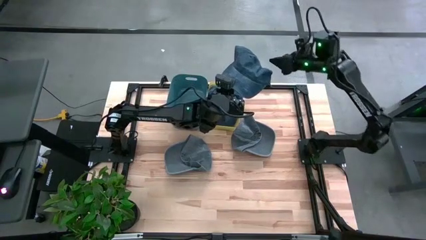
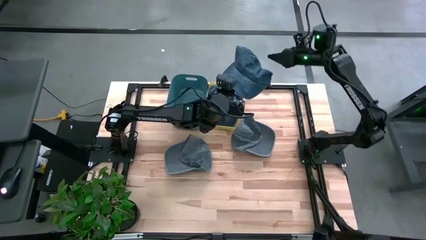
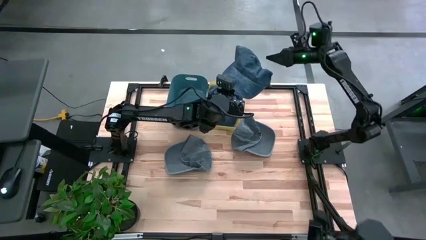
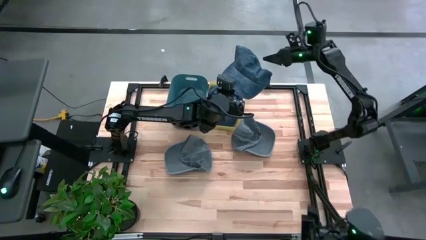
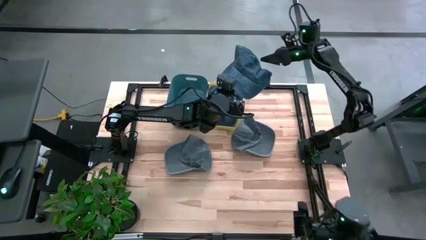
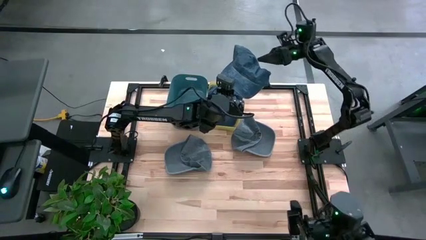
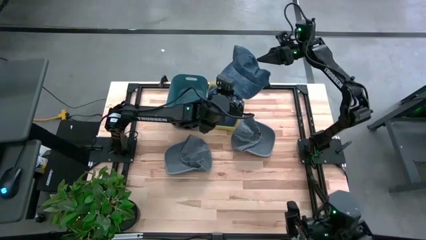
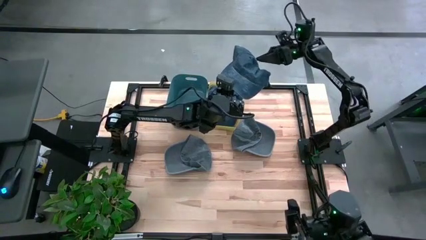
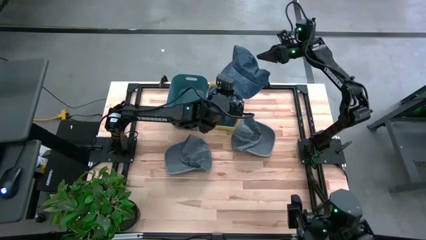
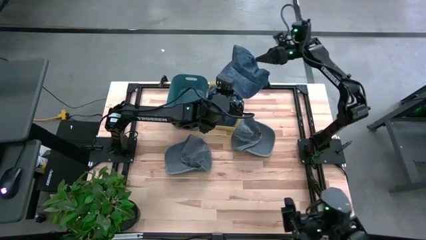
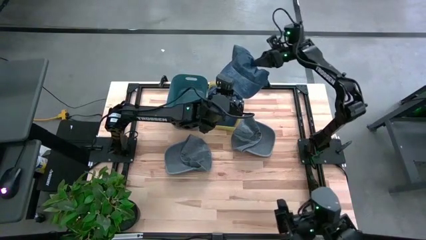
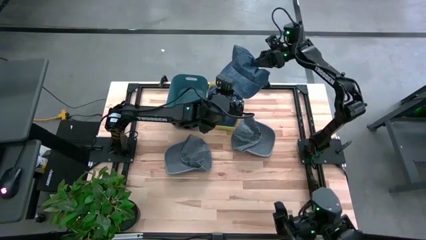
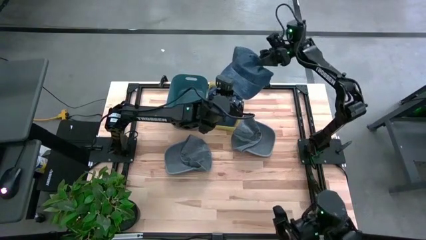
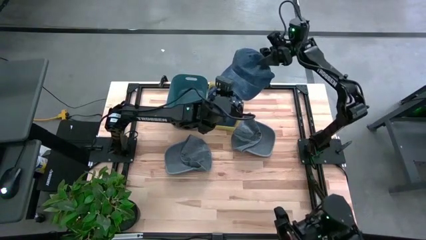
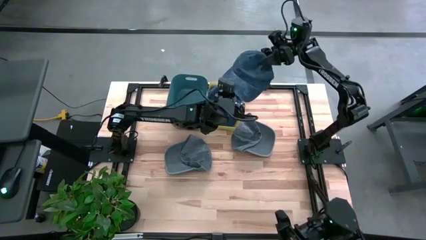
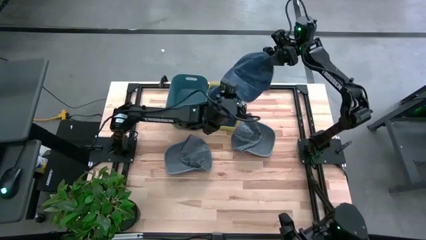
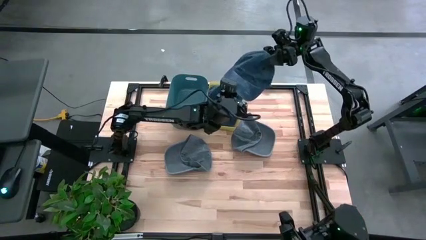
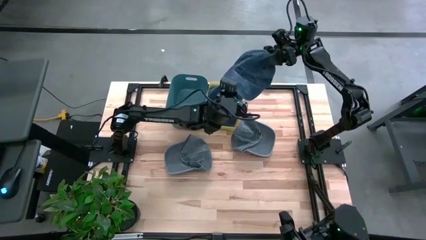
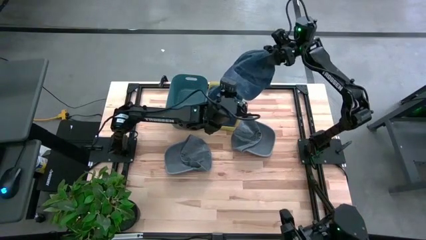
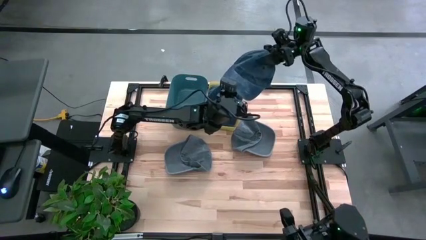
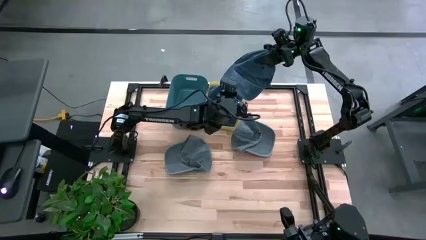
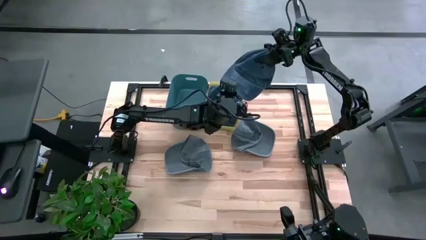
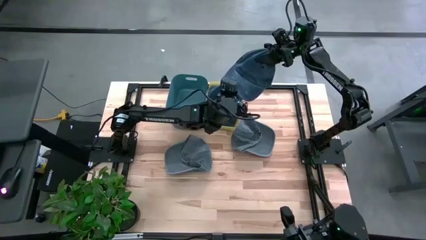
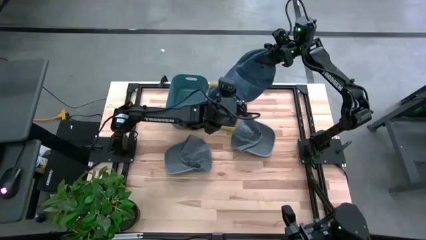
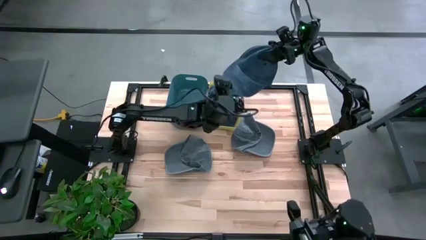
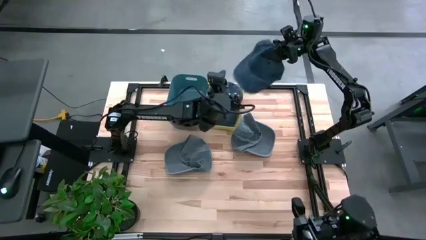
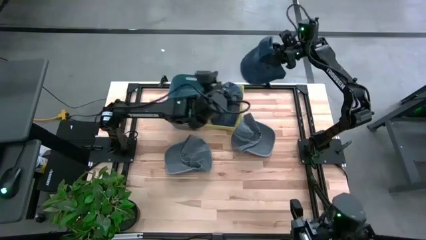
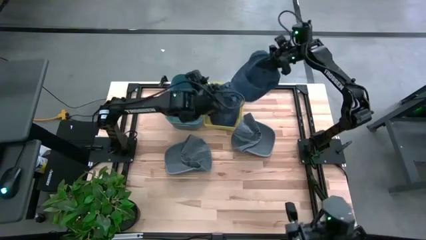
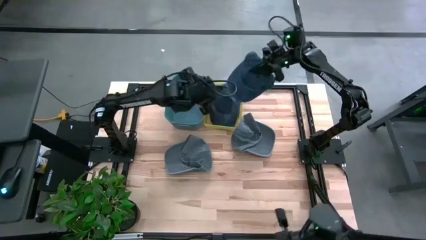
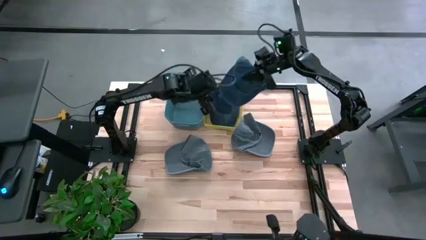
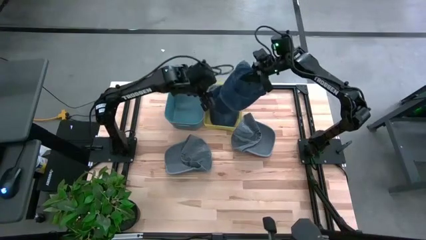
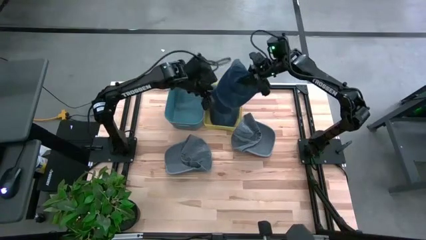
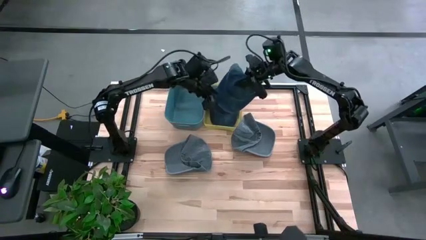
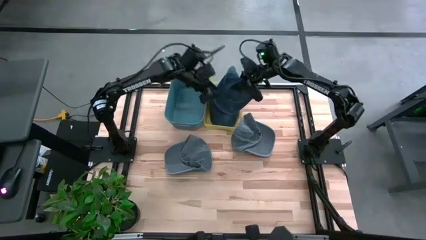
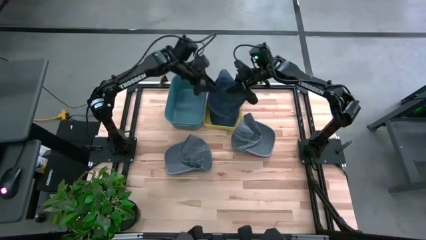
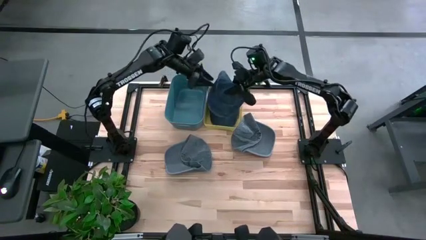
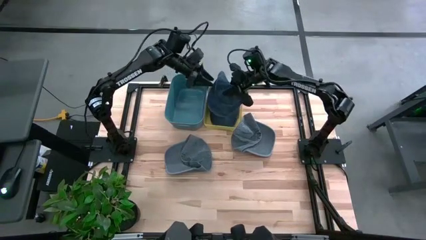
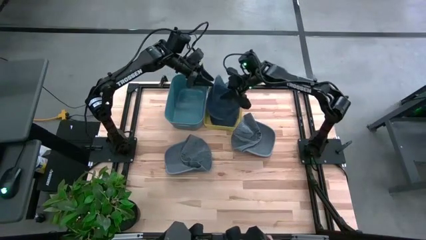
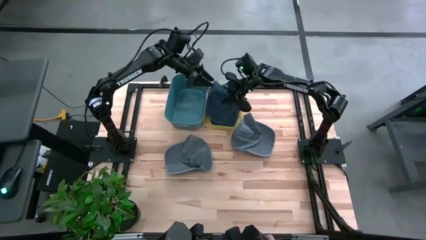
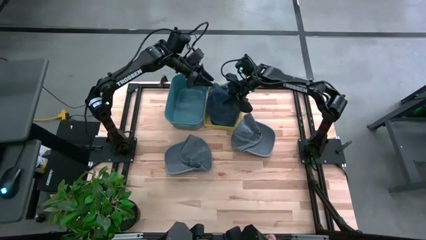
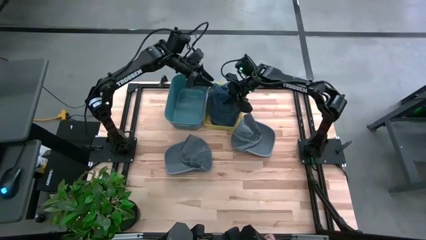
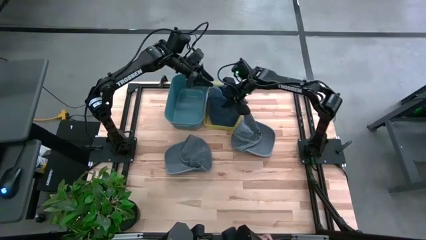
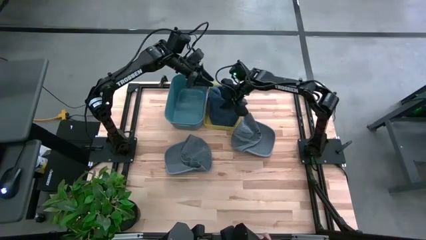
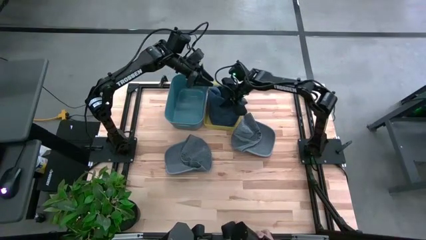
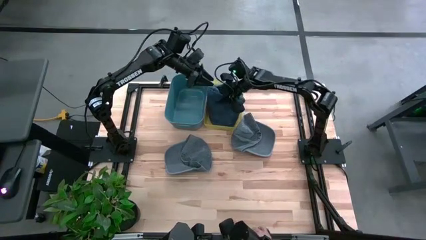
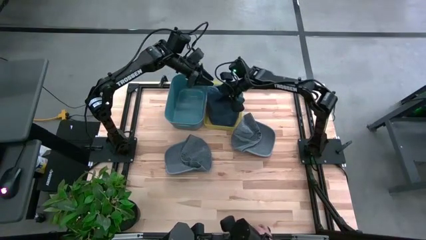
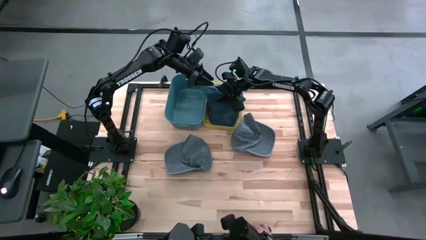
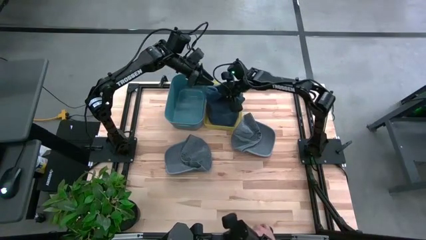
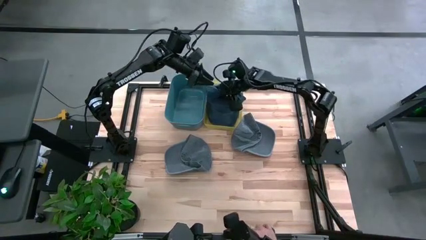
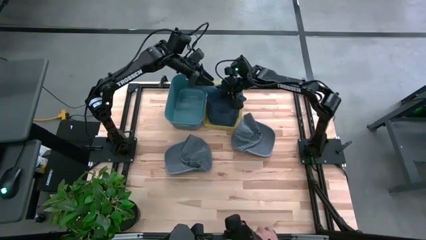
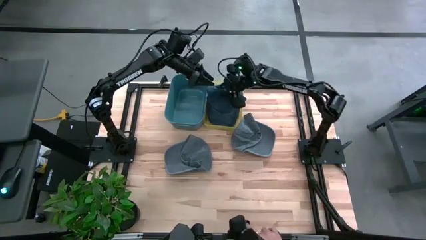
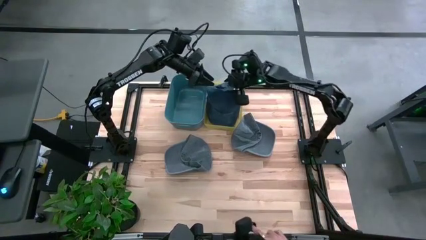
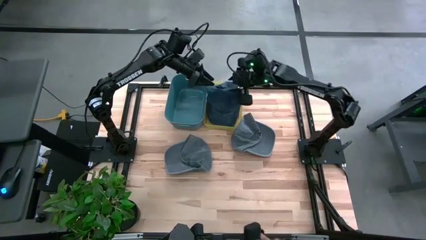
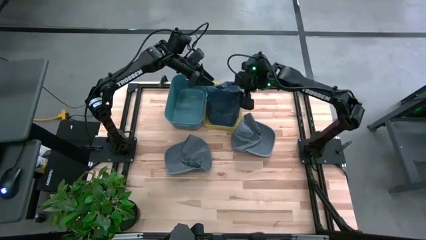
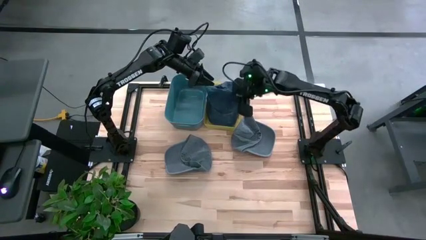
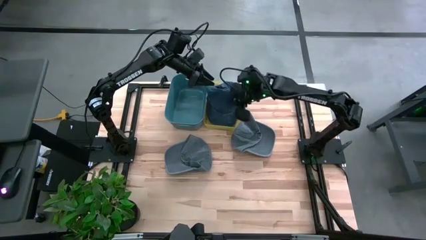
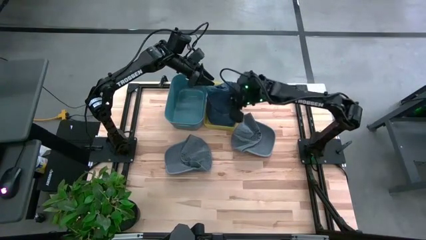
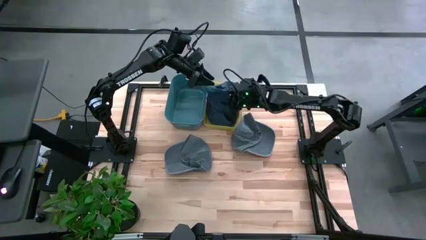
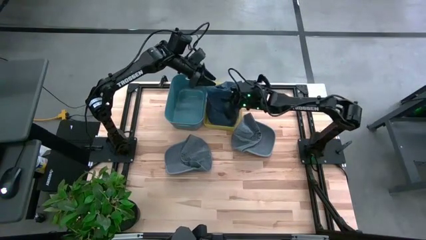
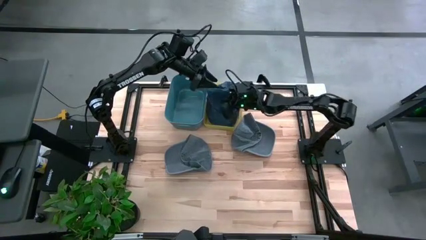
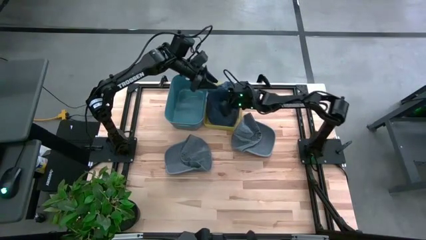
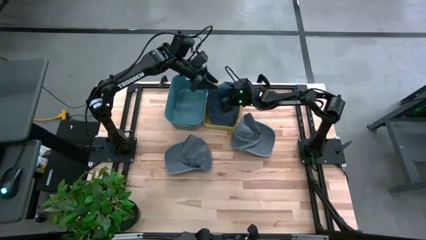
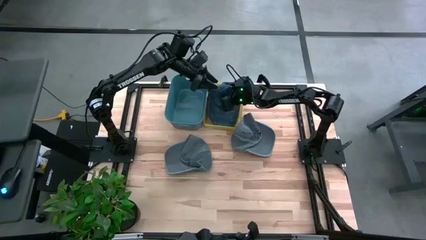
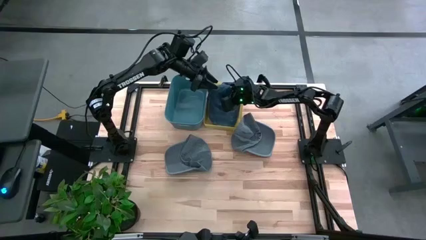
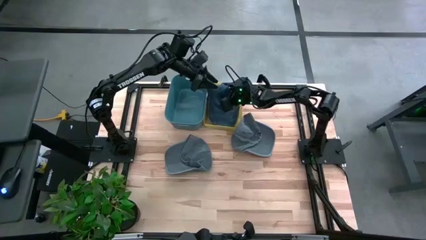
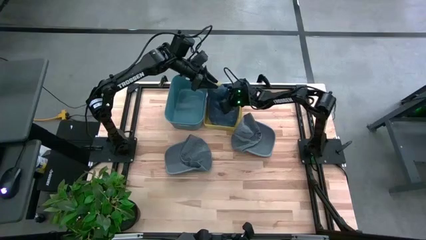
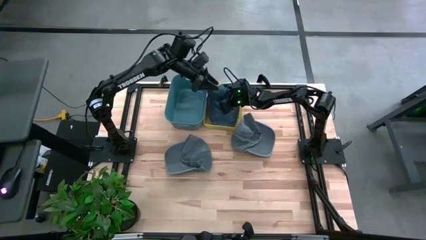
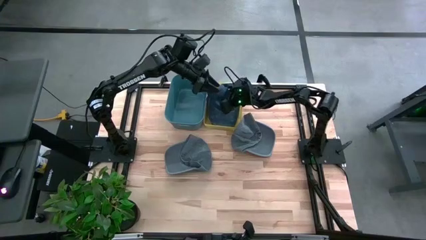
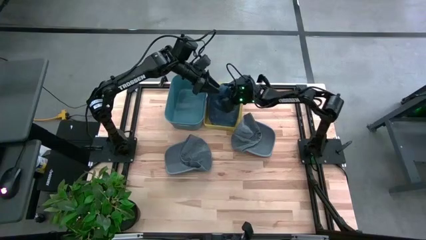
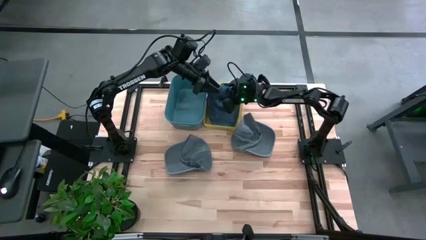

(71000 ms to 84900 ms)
Task: Pick & Place hat
Put the blue cap into the yellow bin
